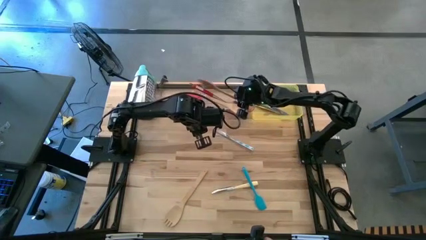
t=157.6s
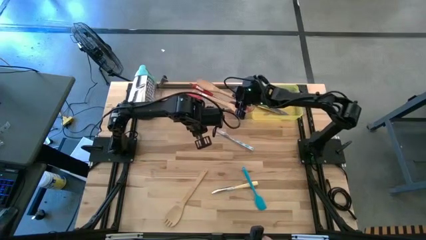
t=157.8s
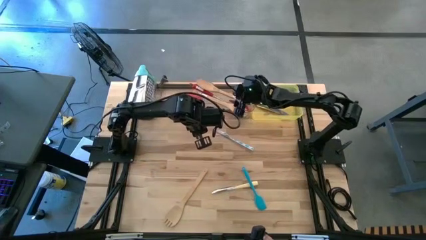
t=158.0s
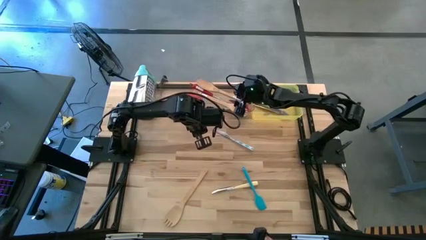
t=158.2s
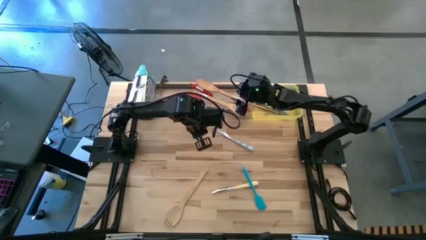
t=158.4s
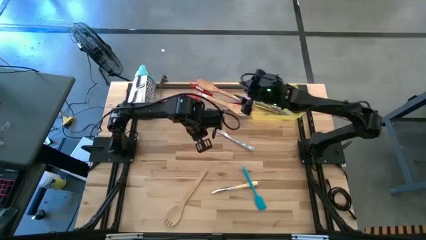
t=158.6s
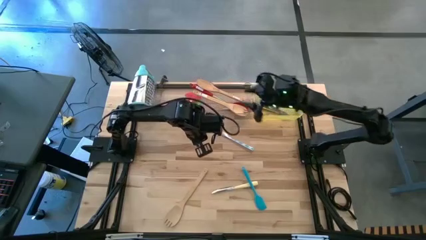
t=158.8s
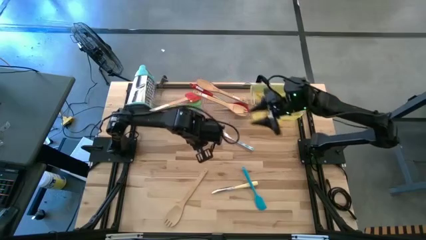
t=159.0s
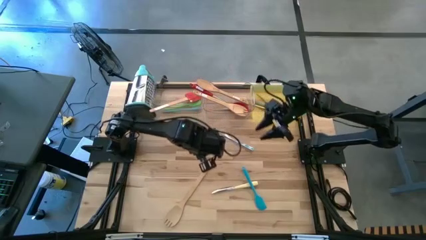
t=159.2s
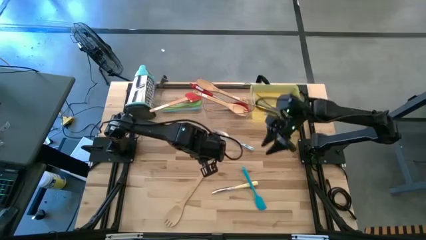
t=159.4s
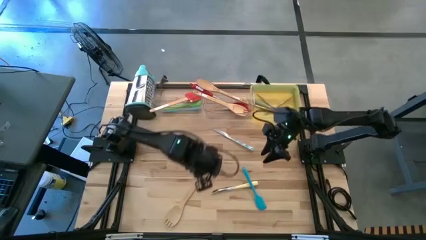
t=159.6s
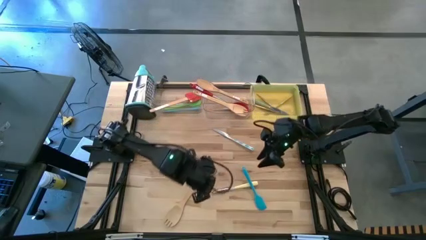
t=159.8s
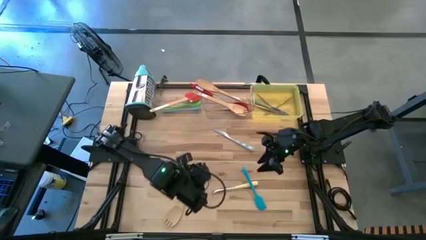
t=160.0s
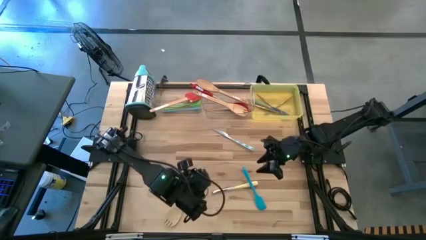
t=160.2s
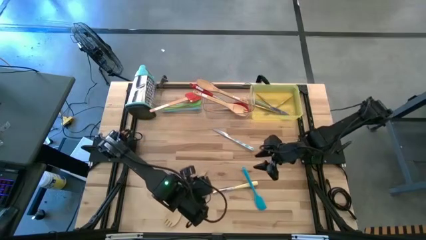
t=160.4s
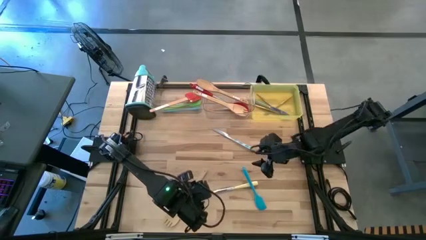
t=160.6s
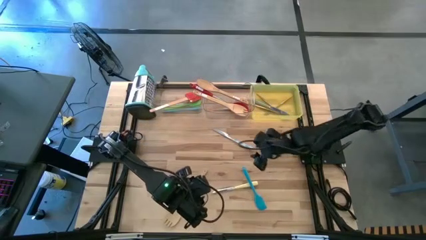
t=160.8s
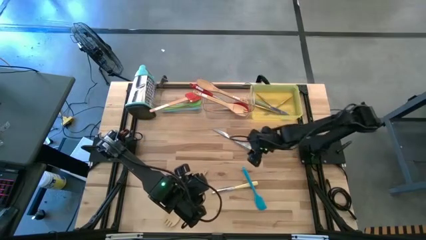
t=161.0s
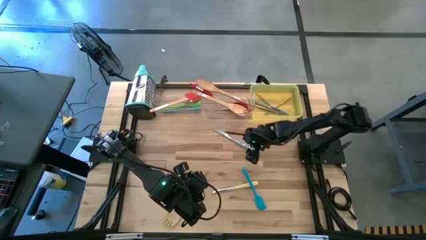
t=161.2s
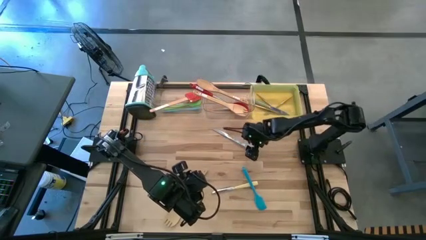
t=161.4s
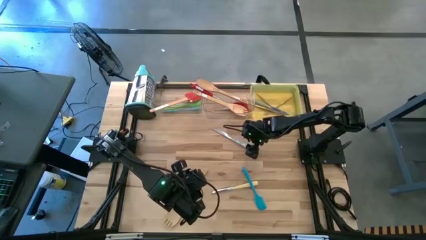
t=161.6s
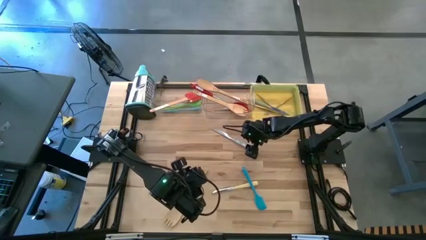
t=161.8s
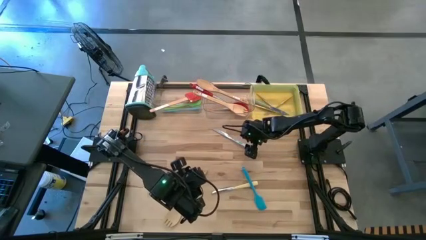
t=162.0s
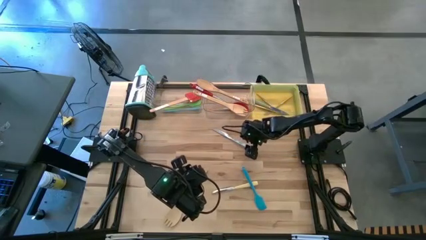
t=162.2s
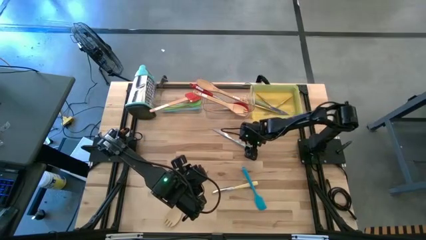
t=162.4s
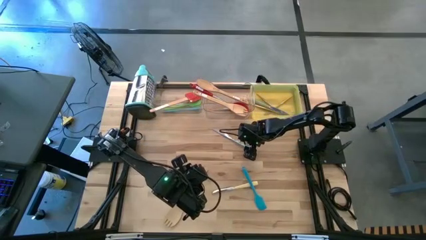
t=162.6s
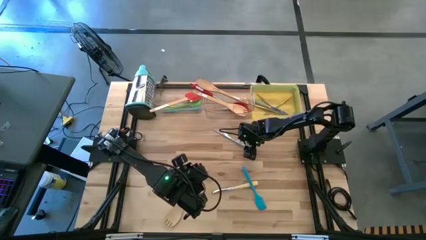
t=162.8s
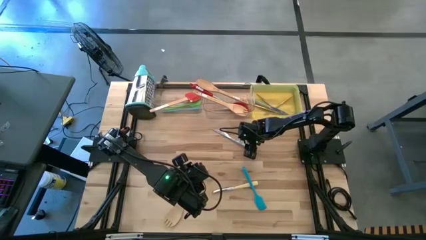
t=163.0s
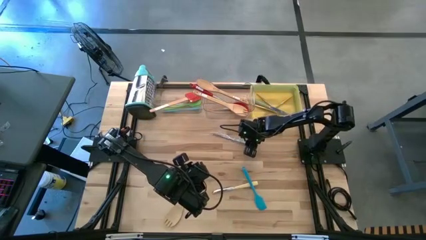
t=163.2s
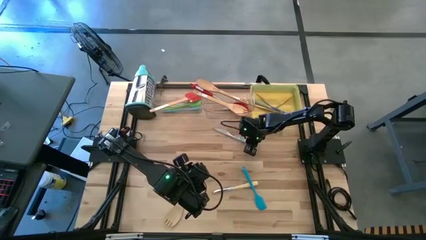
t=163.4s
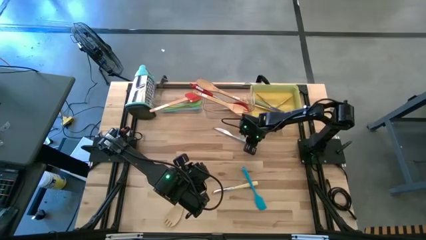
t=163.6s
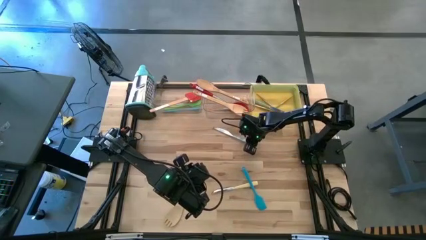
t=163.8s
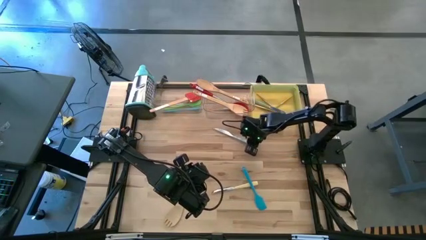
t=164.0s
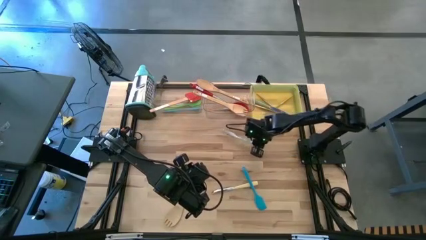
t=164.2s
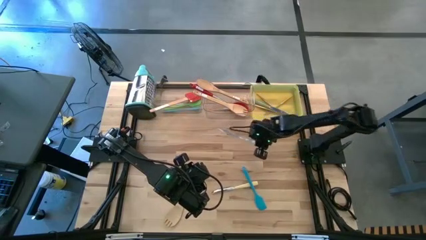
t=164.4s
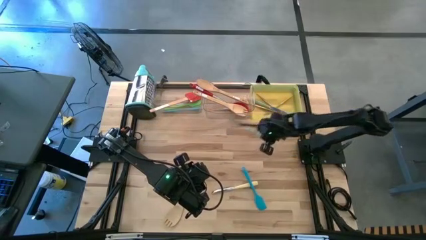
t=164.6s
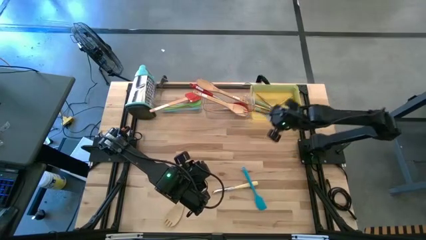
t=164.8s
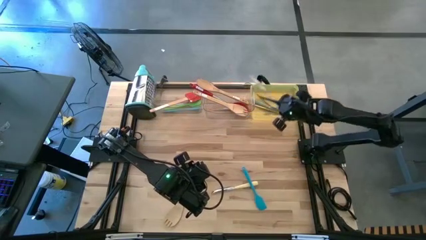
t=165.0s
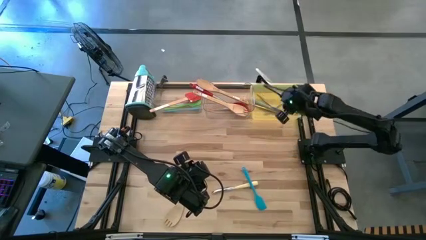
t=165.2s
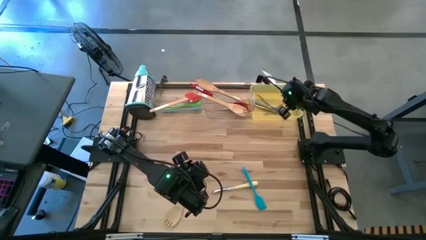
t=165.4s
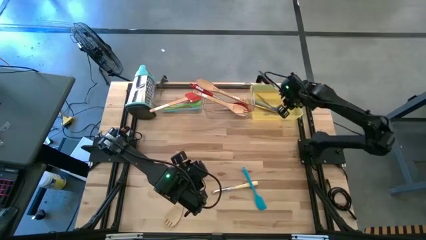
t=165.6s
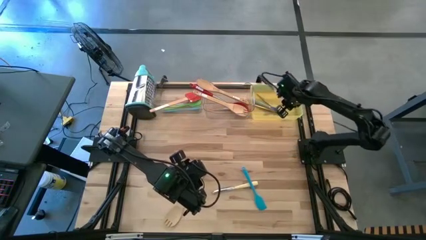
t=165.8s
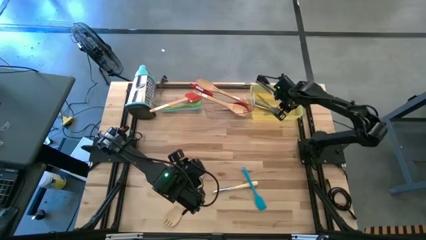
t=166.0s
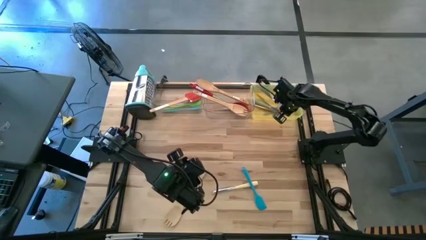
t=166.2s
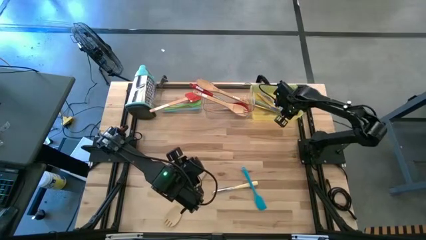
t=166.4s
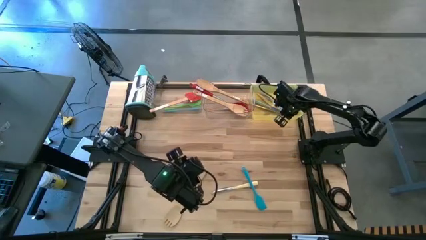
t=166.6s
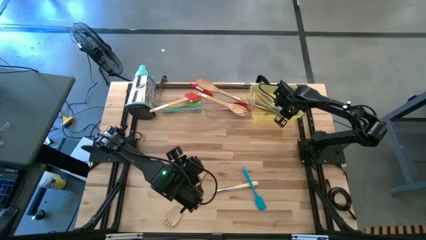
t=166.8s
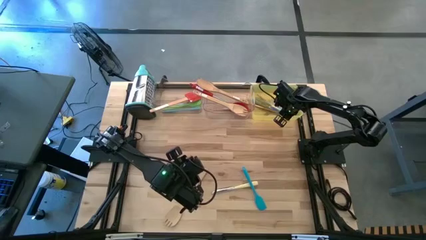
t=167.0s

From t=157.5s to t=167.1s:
Task: Pick & Place Kitchen Items
Put the blue knife into the yellow bin

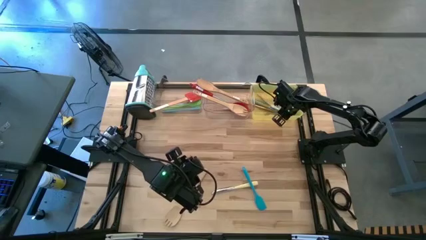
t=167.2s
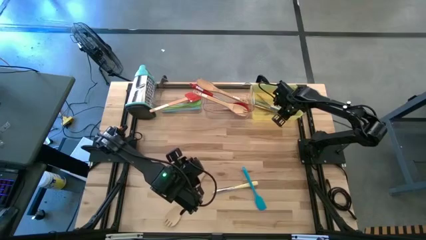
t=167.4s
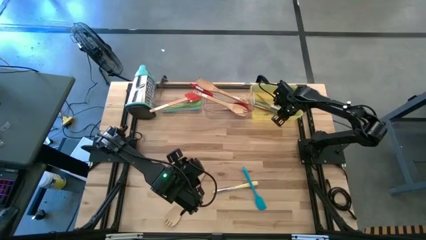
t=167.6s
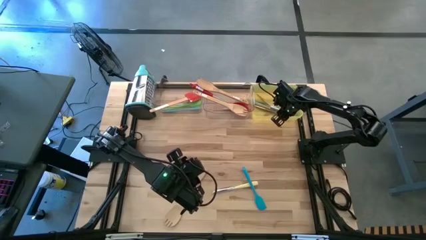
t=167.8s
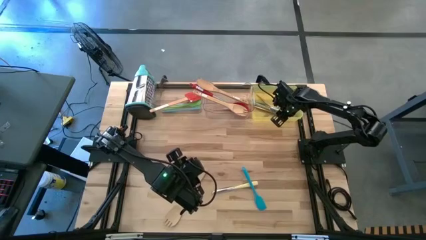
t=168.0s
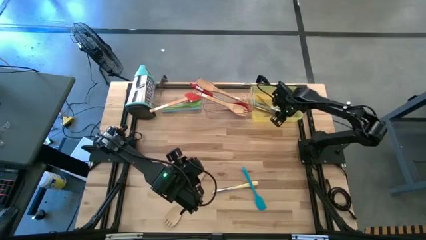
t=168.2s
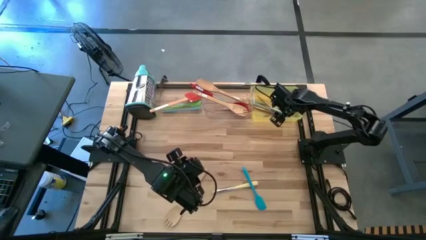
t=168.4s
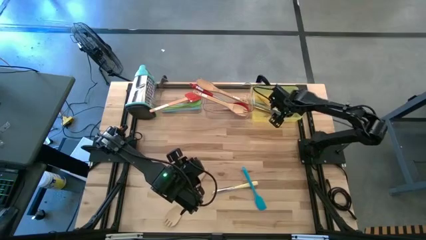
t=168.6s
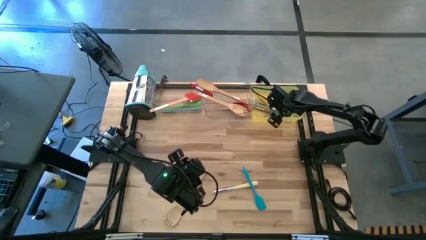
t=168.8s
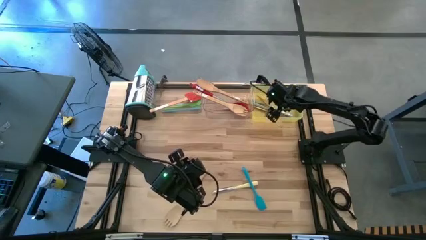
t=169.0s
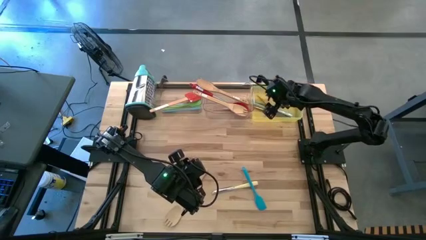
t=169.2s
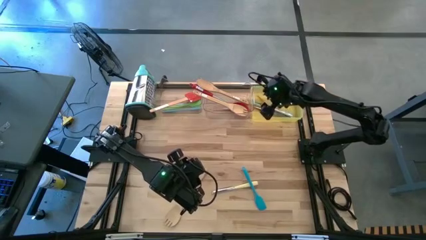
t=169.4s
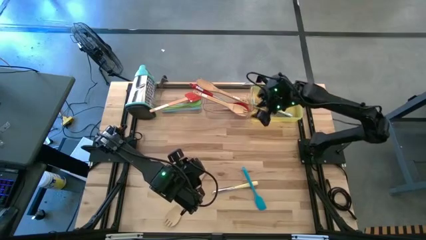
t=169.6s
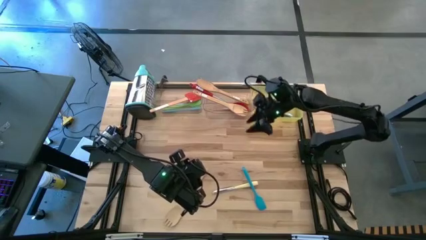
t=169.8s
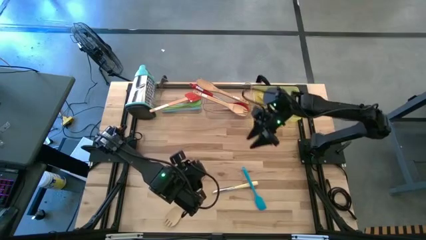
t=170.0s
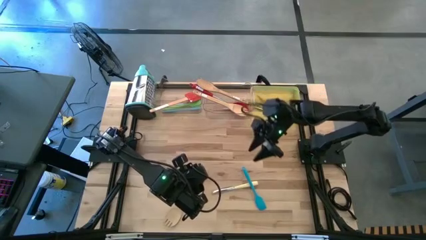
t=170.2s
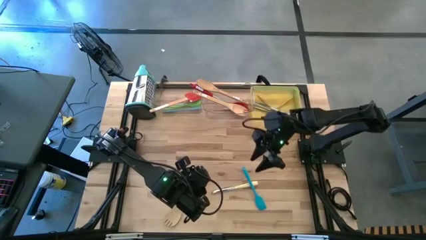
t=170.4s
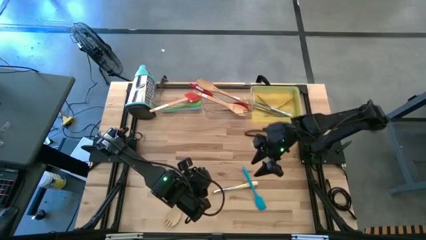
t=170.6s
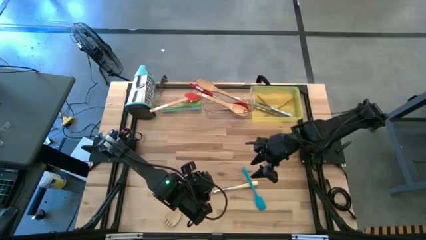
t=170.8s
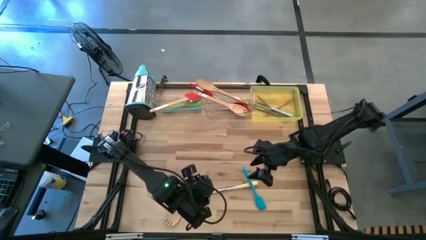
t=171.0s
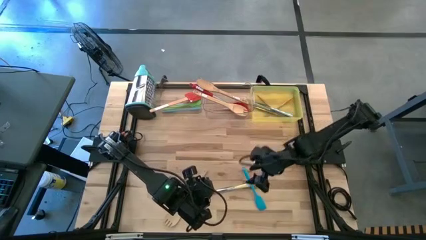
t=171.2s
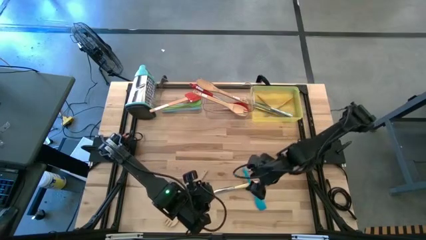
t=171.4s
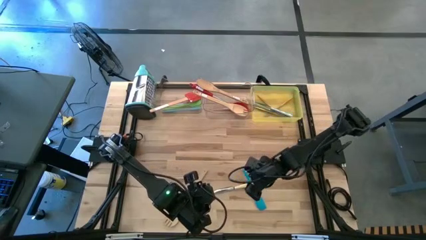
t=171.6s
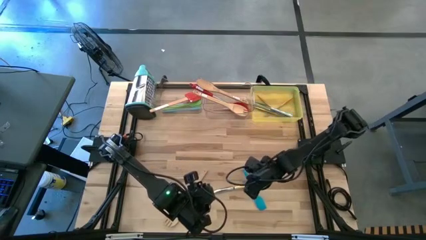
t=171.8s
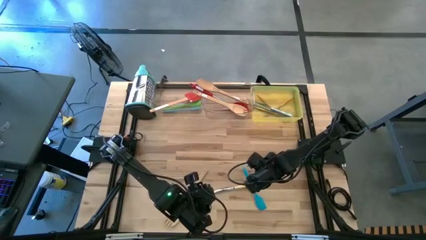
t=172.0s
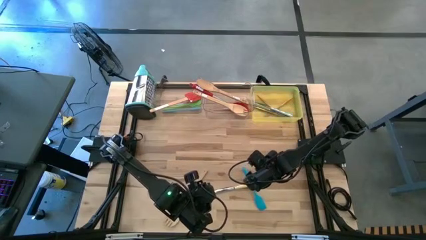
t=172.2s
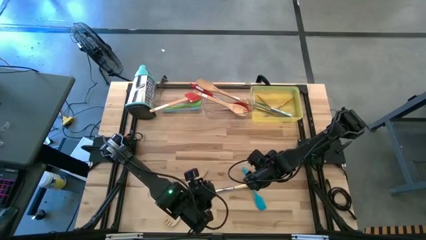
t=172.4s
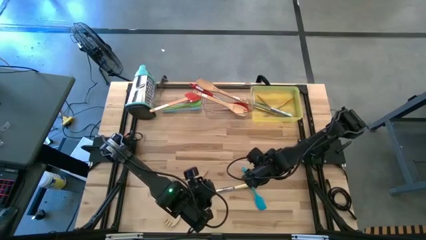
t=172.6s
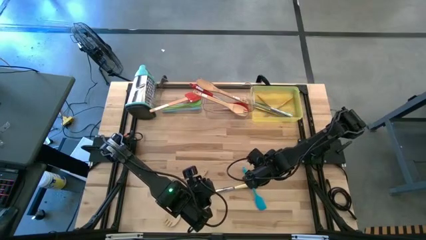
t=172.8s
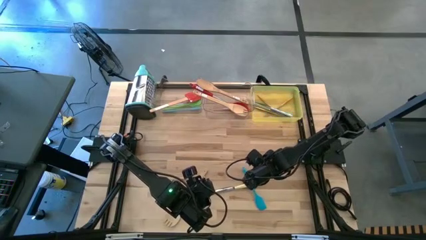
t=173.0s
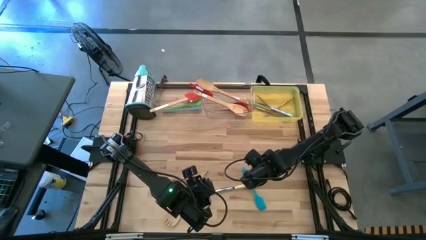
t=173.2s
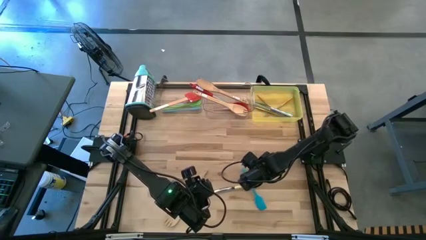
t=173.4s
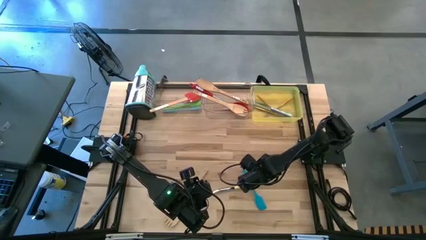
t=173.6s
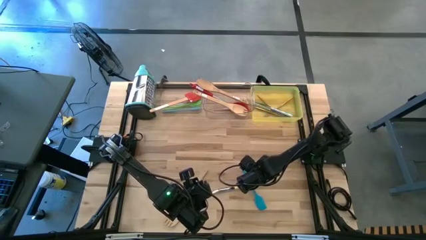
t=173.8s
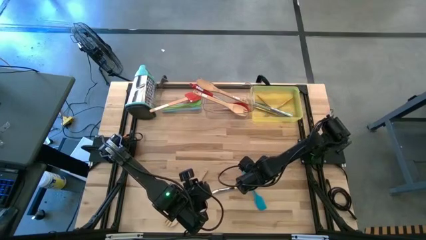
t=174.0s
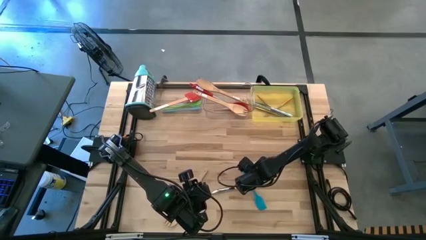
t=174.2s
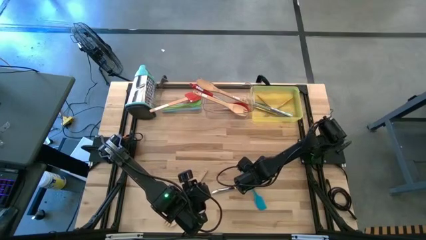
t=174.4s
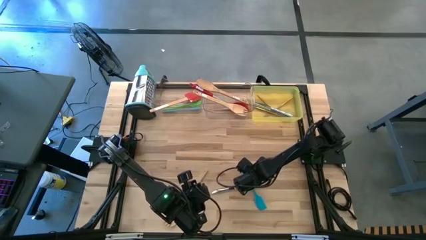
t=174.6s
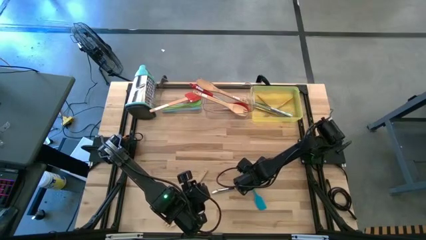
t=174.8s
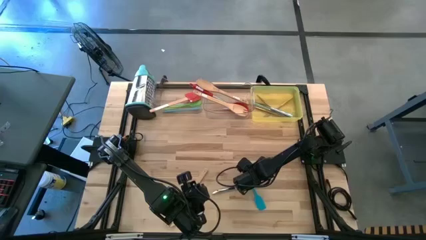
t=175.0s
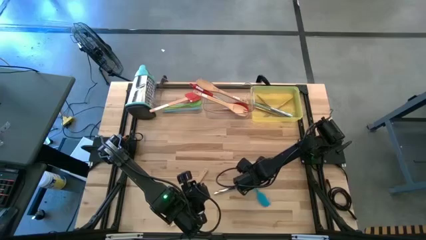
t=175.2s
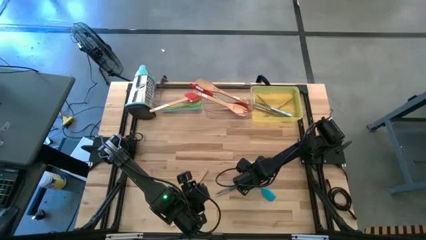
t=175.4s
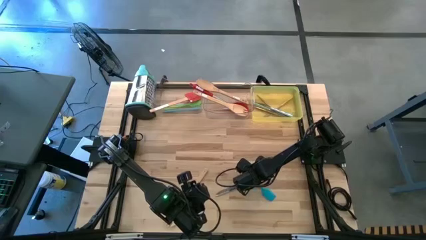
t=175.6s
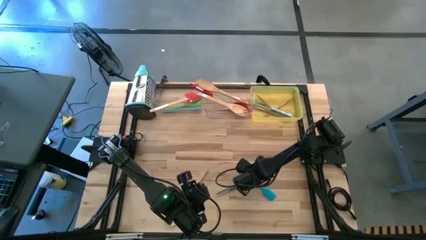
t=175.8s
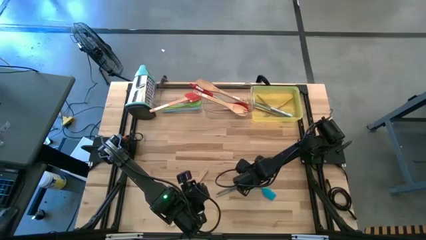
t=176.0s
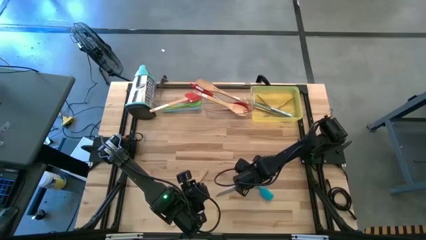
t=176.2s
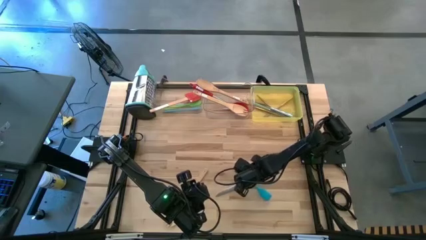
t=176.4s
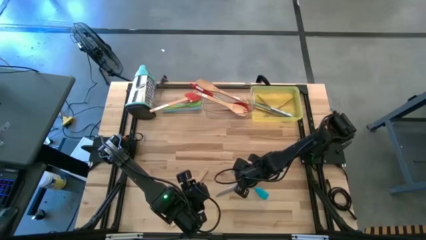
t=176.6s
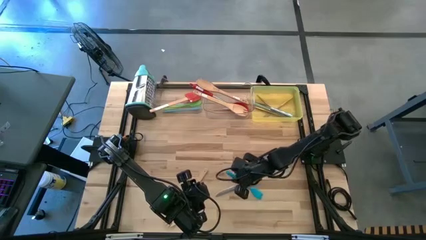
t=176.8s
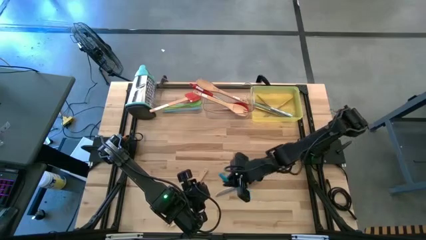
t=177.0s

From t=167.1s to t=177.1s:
Put the blue spatula into the left transparent bin
